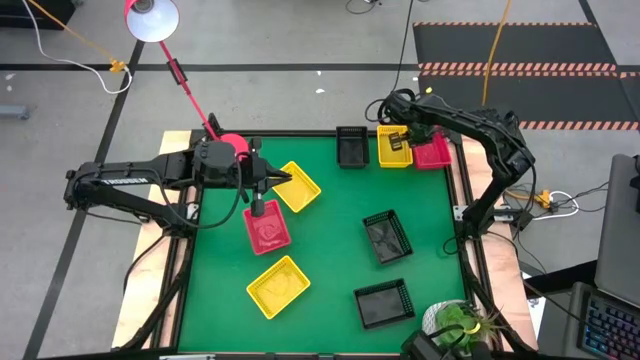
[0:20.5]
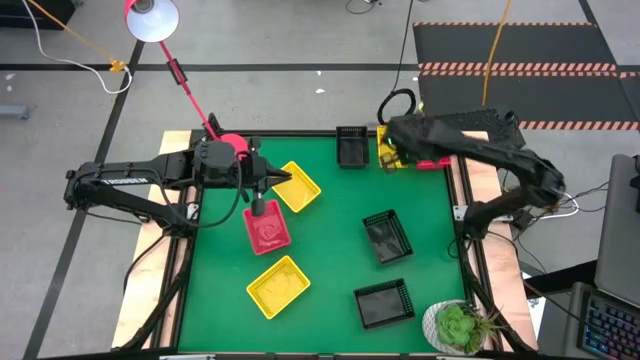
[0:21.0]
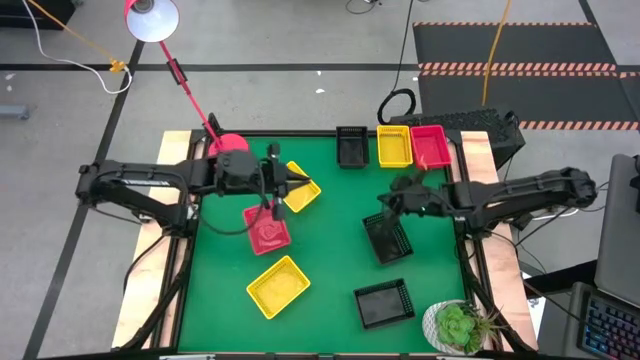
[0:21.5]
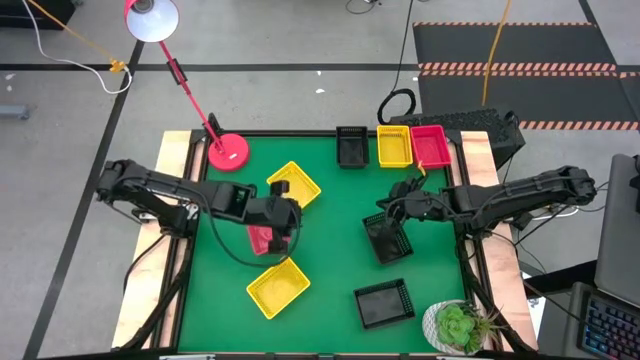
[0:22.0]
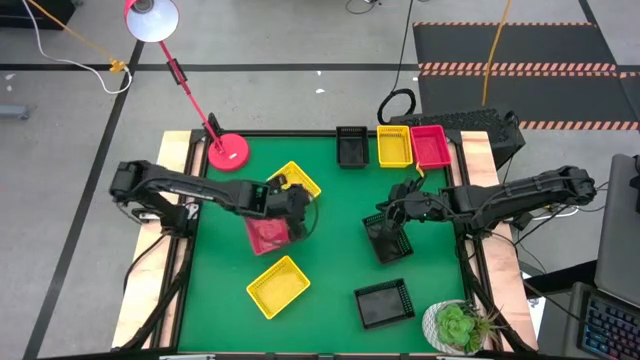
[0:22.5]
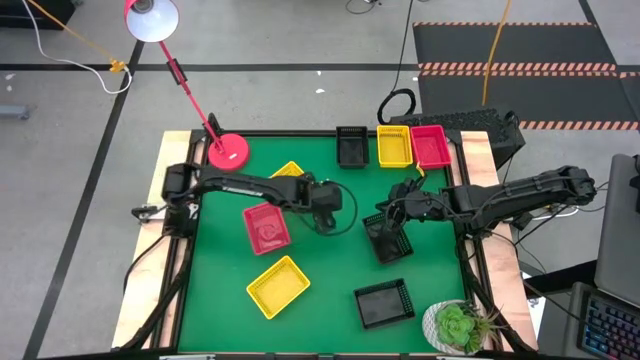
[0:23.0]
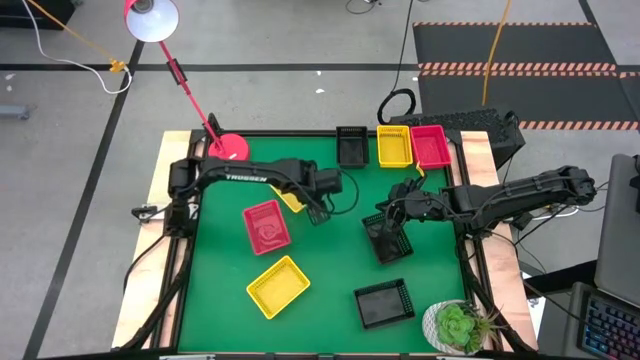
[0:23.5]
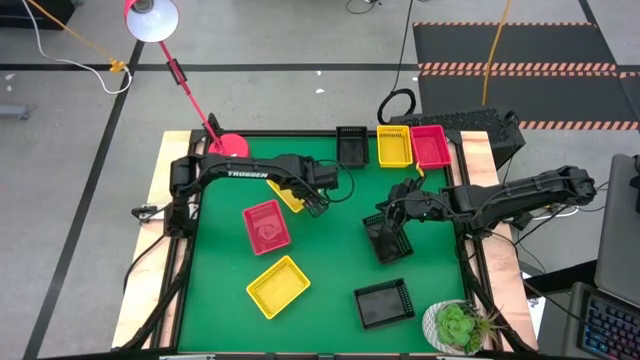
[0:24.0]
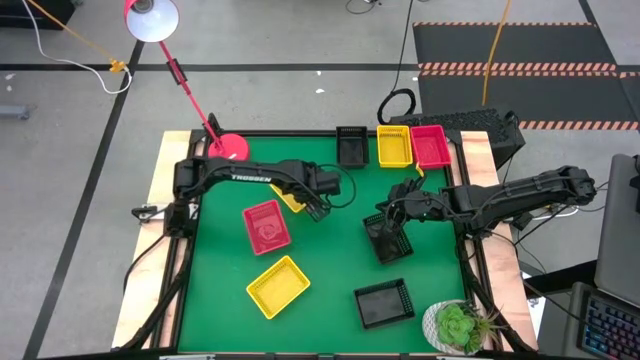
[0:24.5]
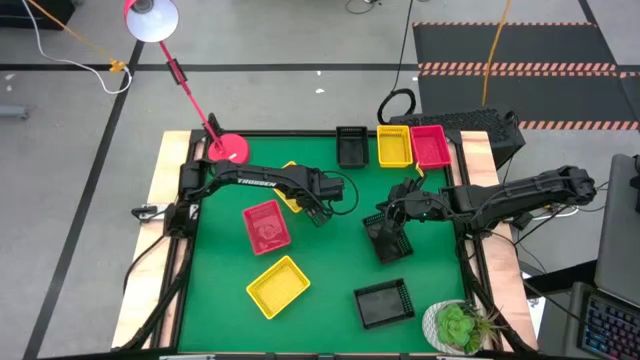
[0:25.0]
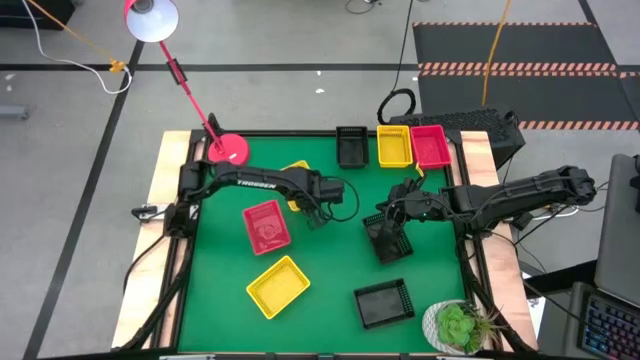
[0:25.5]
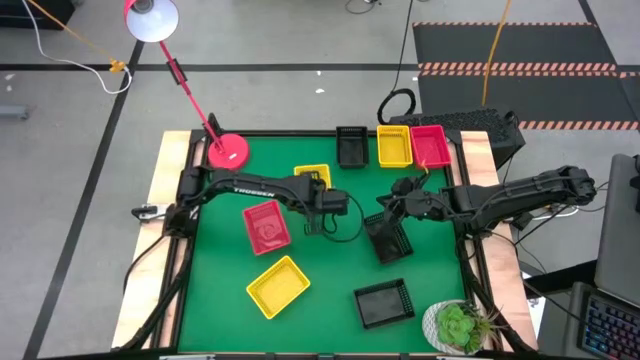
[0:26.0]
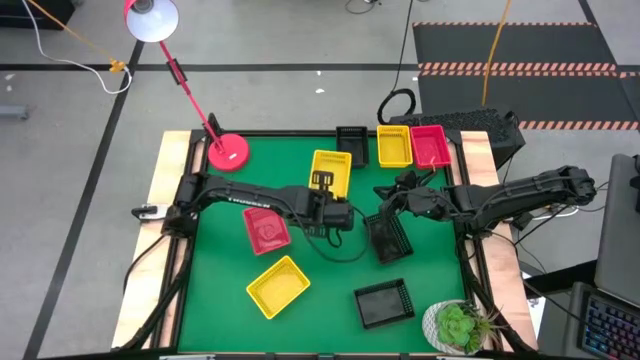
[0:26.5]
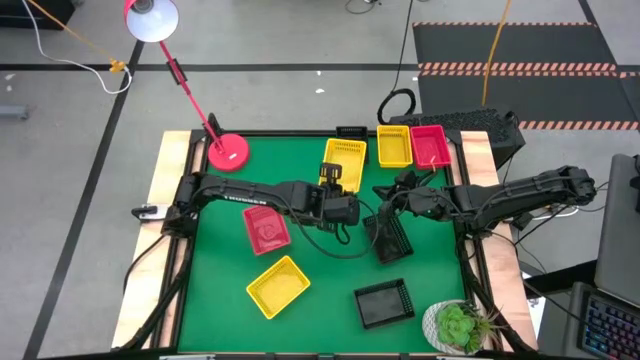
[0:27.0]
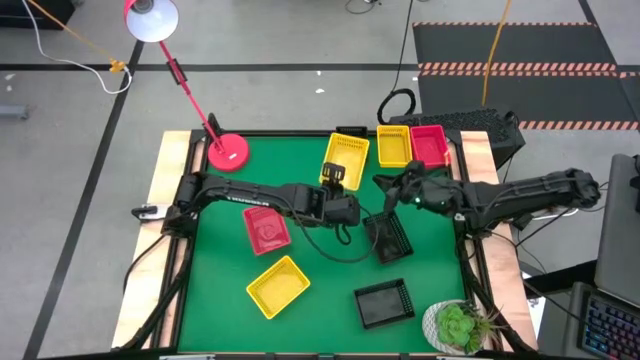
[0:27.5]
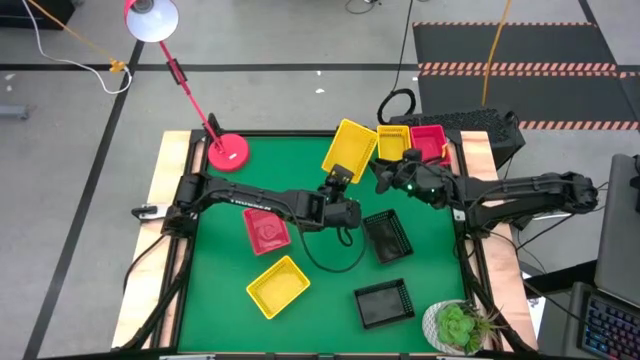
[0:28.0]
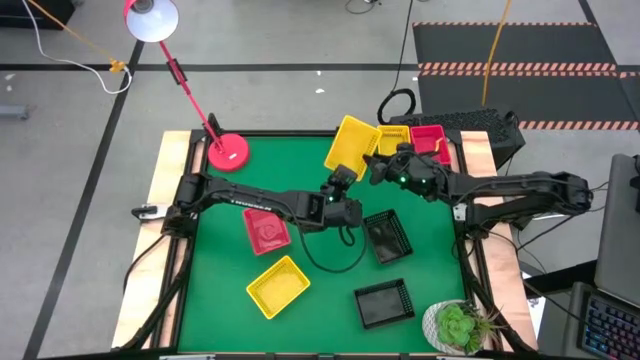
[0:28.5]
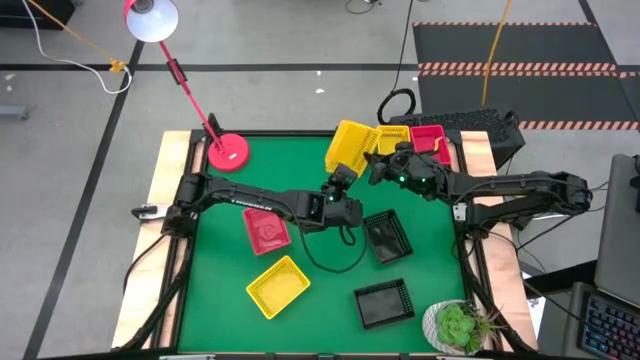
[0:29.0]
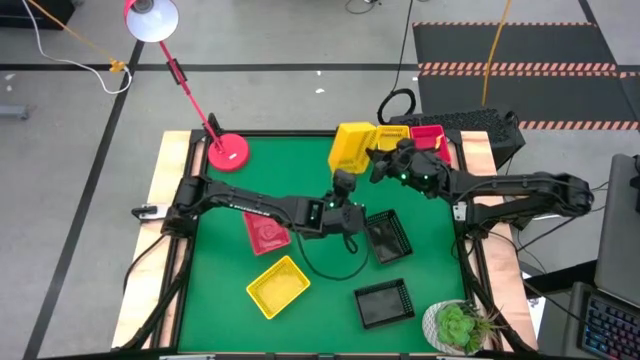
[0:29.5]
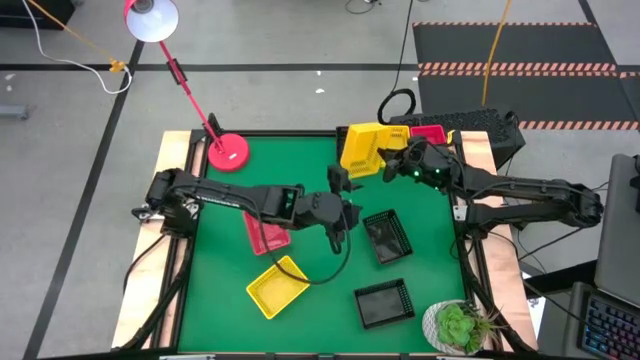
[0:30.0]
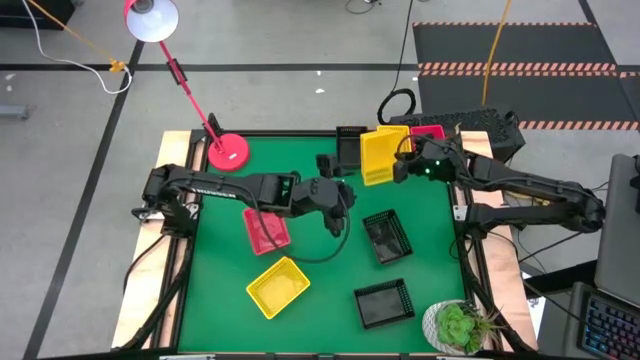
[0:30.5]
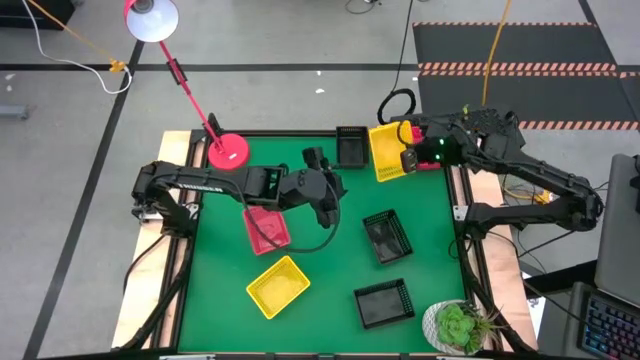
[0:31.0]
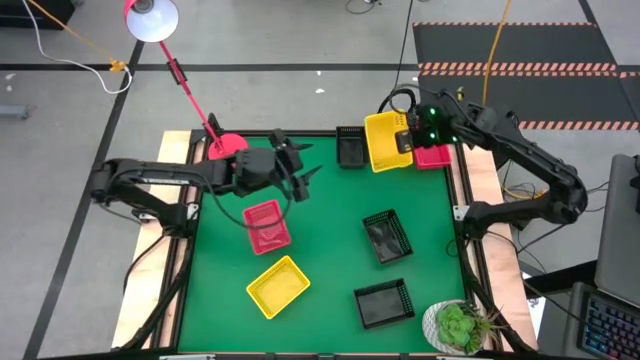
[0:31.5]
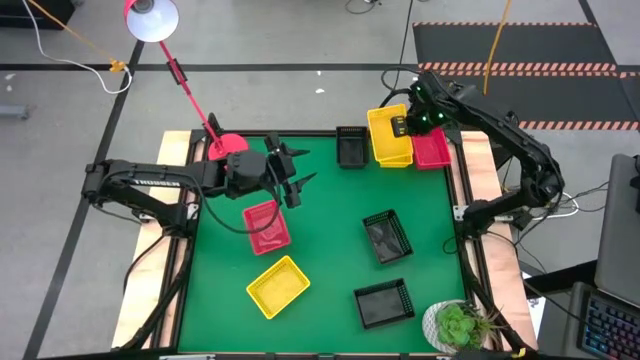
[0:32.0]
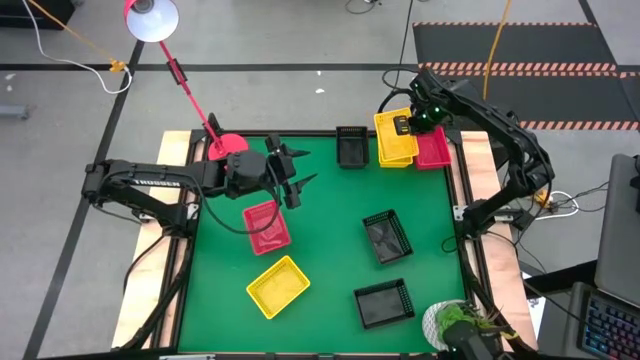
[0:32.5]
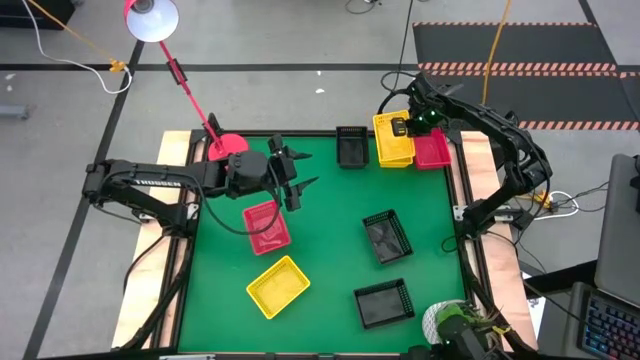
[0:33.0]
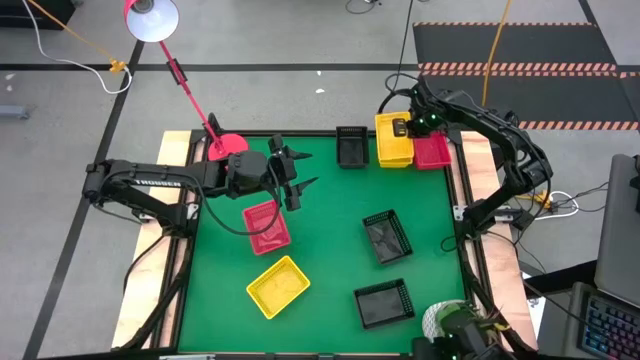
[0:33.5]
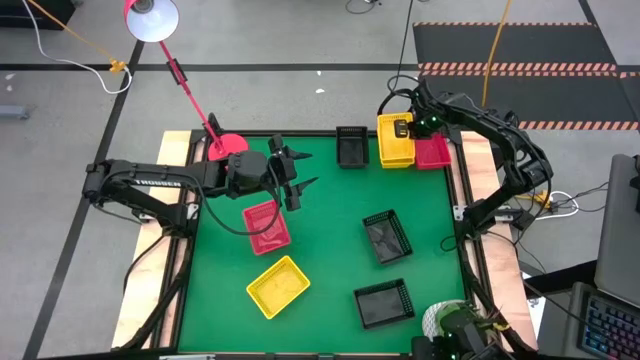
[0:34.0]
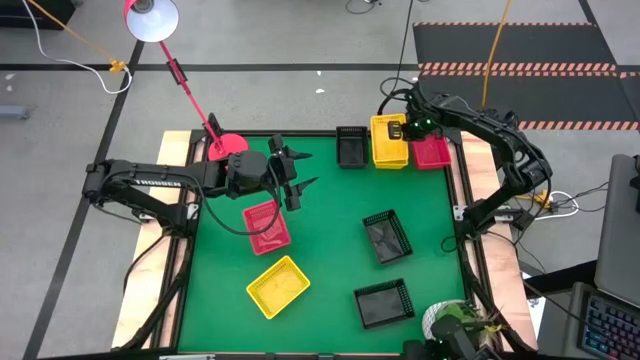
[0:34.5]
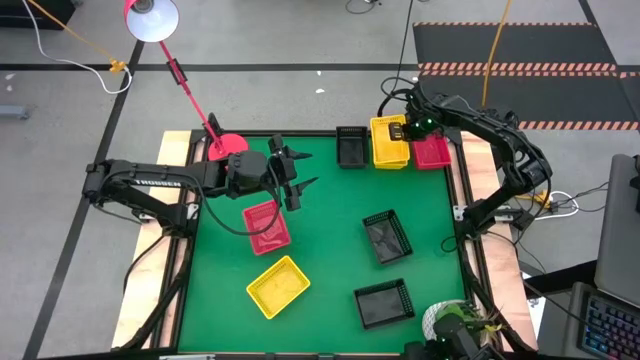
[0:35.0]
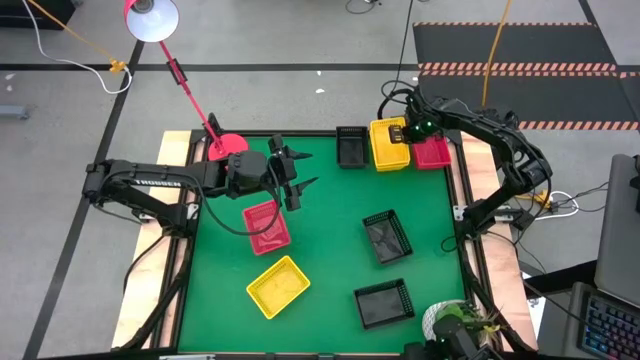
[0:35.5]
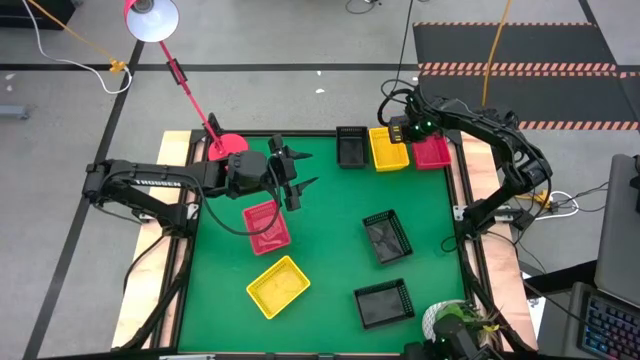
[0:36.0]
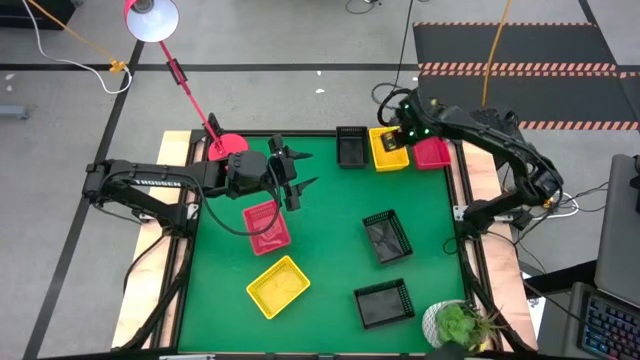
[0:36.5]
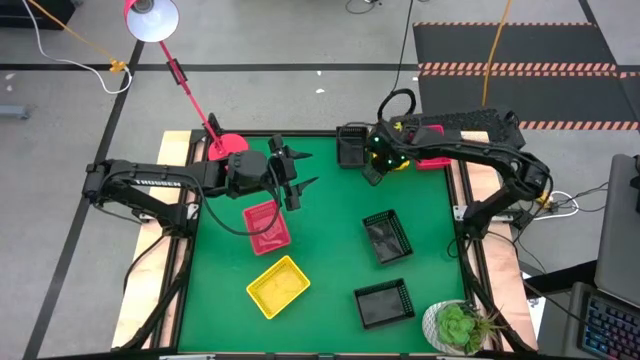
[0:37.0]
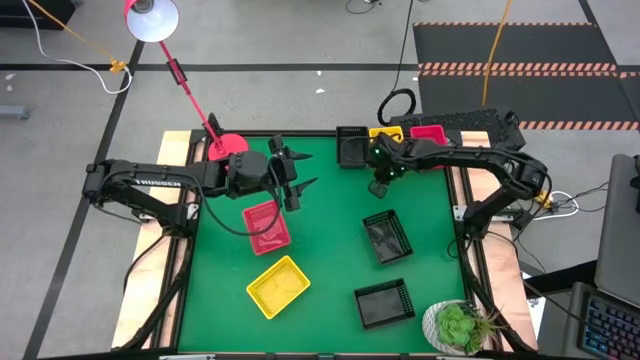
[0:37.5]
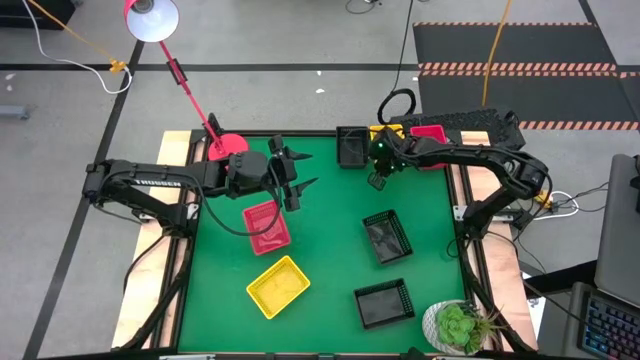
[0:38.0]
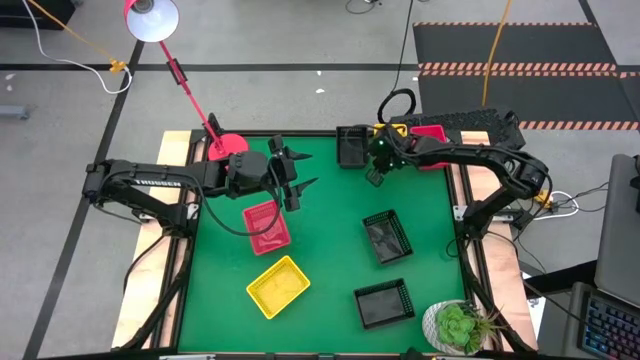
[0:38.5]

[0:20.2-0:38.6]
Stack the middle yellow bin on the top yellow bin
